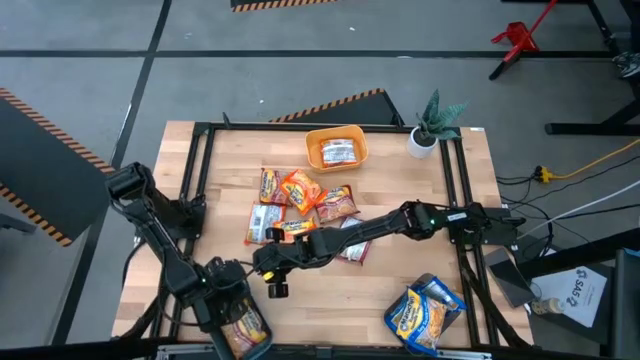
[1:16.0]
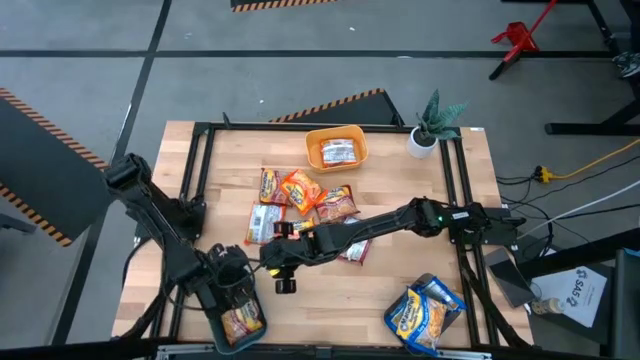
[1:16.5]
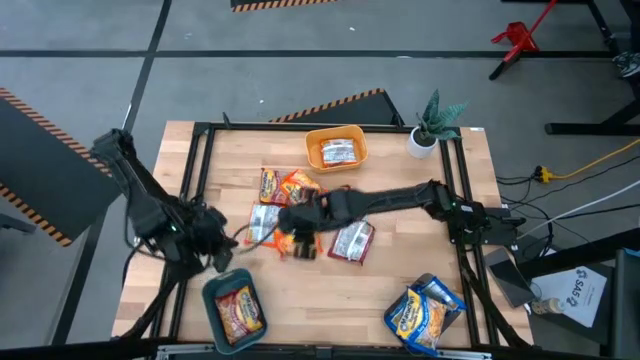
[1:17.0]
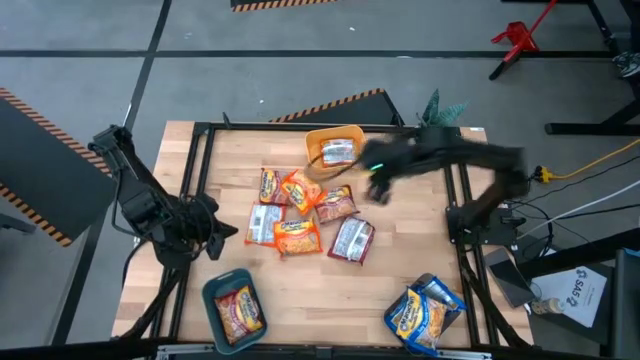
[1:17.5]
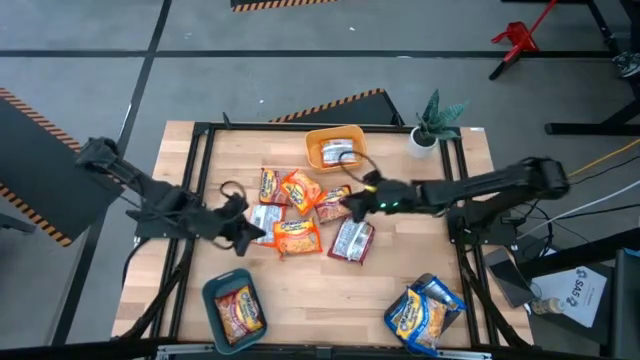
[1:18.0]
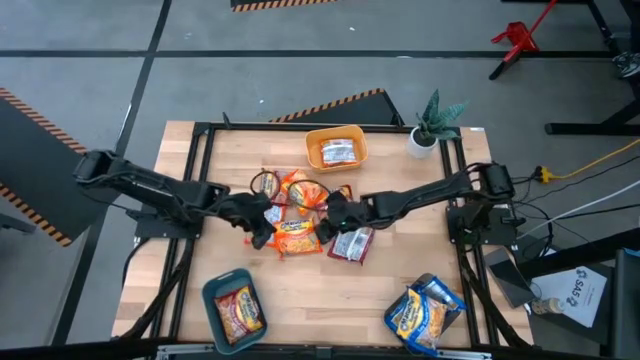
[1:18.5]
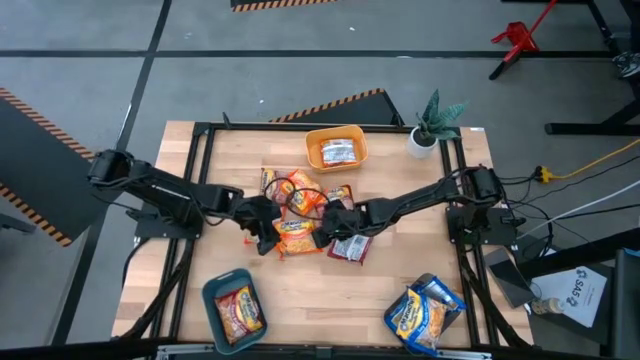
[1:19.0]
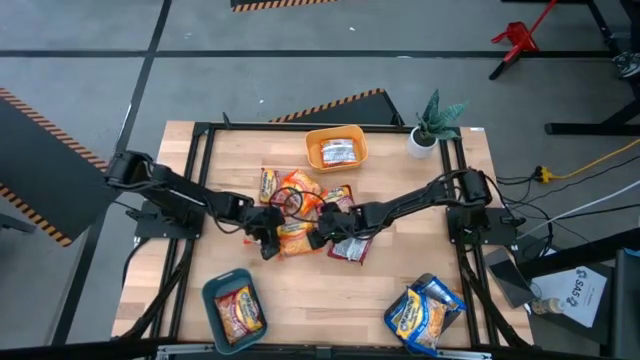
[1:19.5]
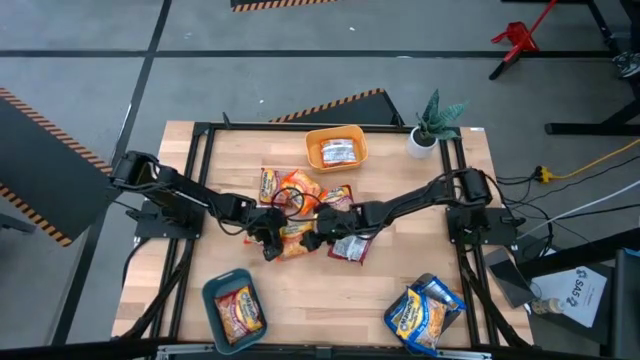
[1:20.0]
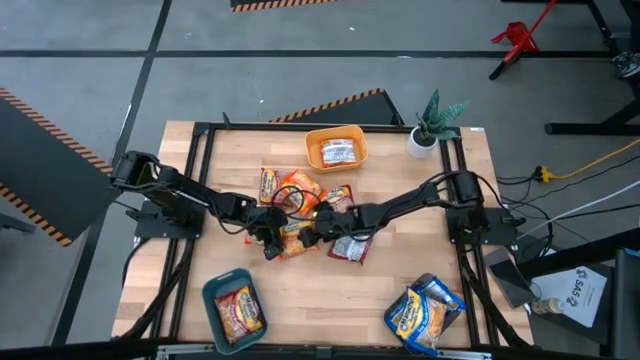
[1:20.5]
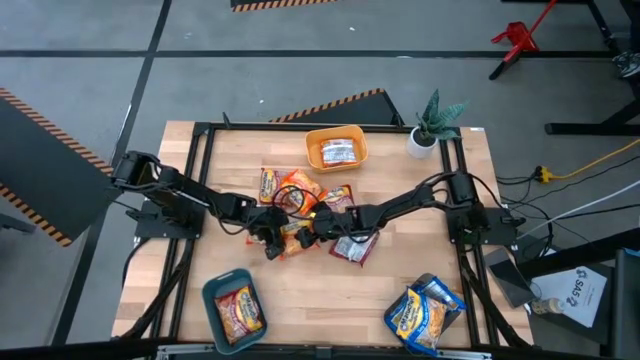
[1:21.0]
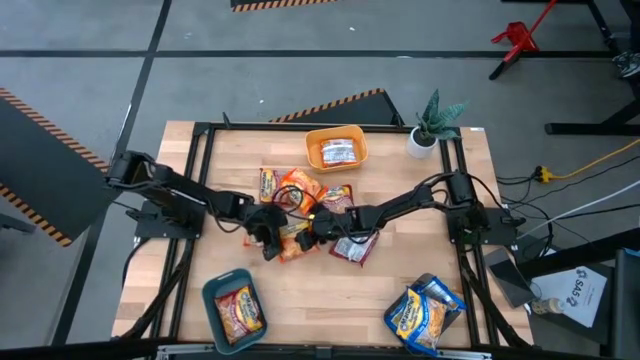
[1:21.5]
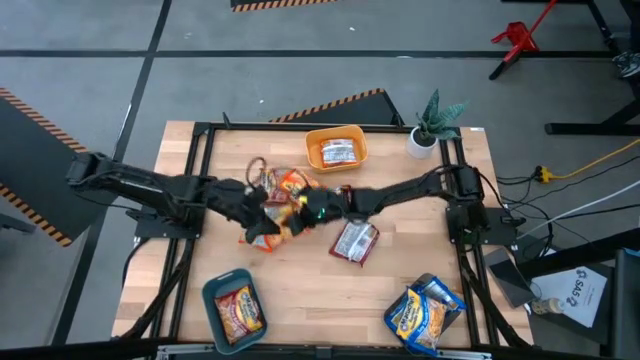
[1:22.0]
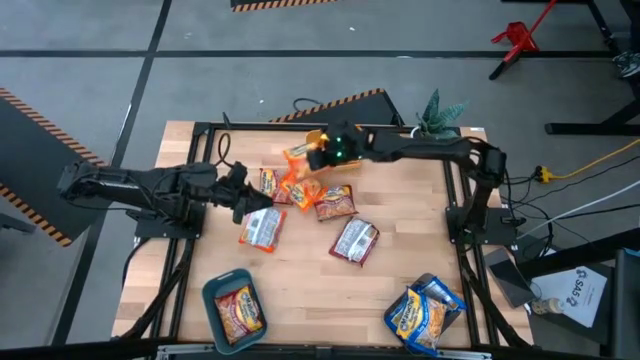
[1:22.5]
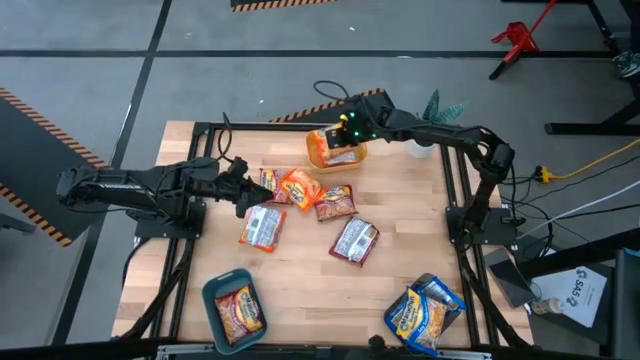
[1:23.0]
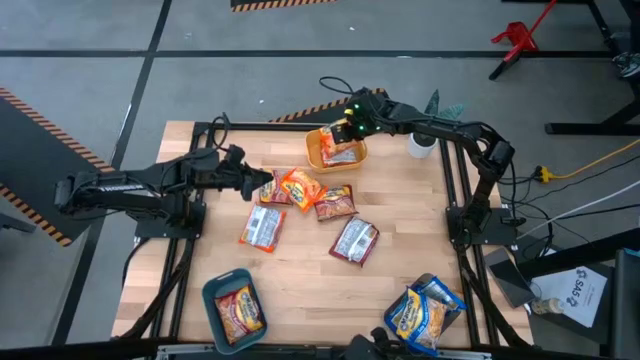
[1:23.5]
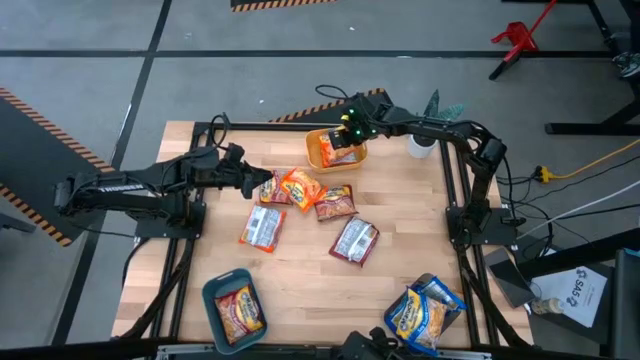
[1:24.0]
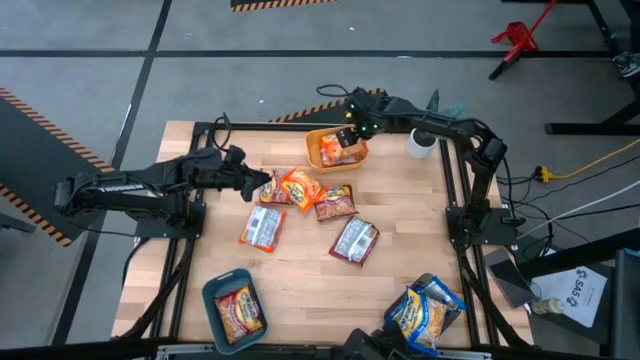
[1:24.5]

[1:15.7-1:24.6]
Task: Sort Maruchan noodles
Put the orange noodle pack into the yellow bin

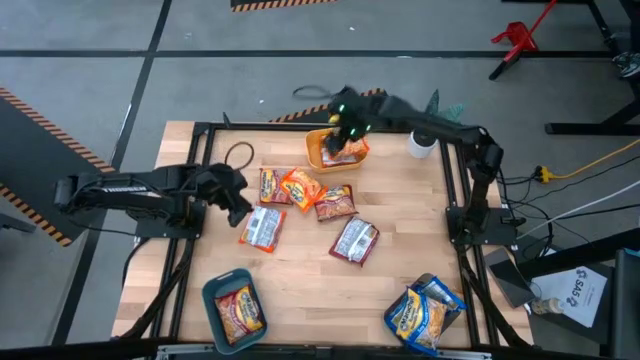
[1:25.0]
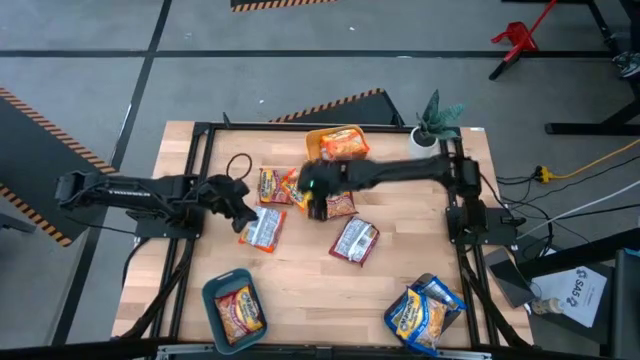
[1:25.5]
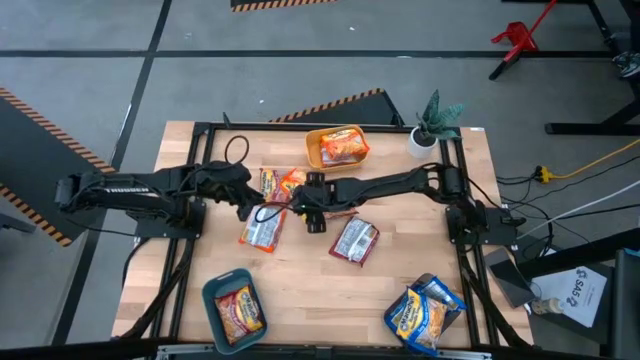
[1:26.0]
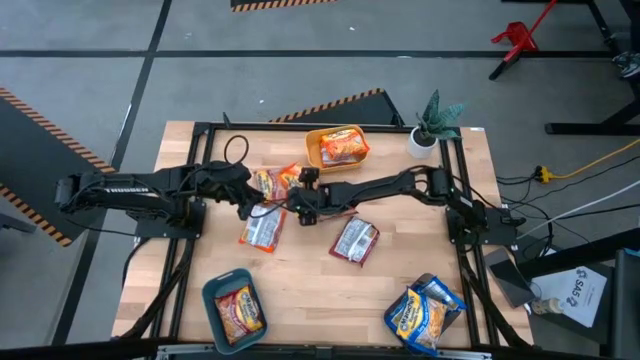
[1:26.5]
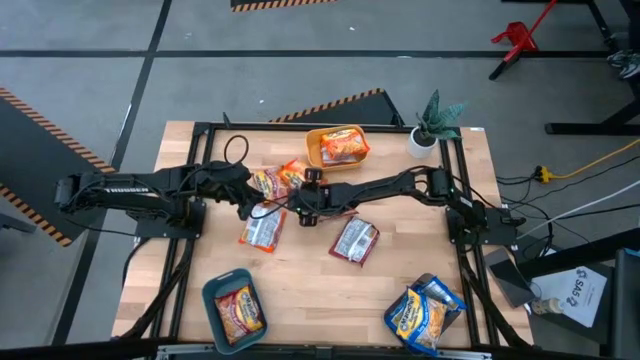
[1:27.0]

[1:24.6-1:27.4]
Put the orange noodle pack into the yellow bin

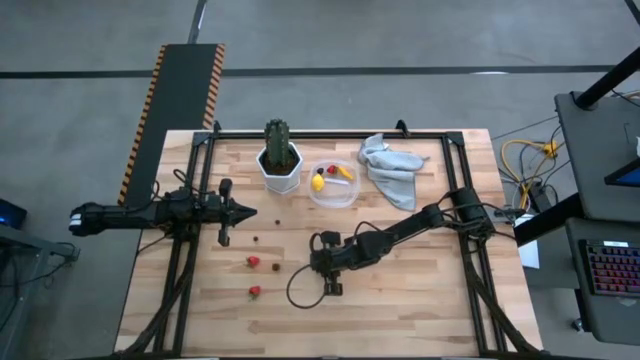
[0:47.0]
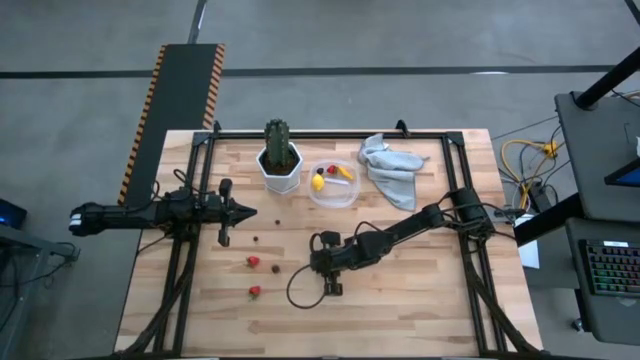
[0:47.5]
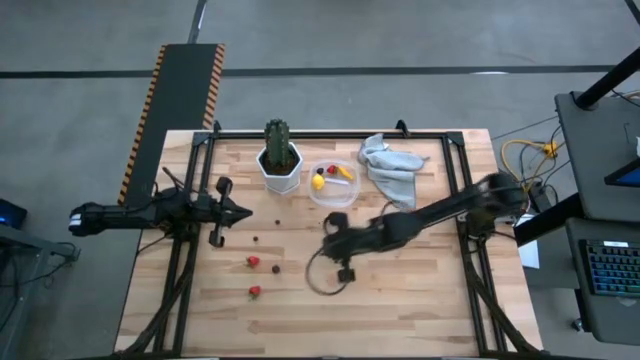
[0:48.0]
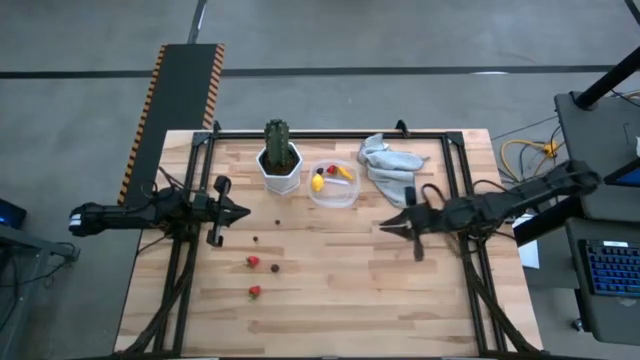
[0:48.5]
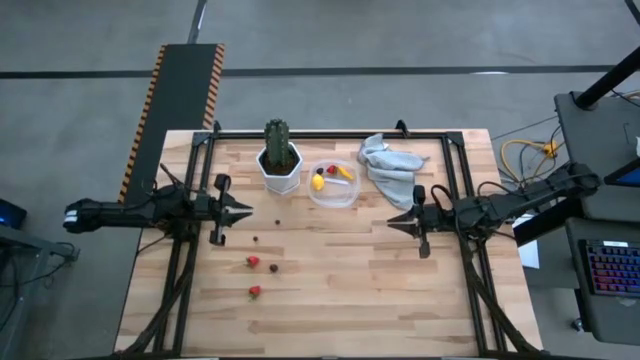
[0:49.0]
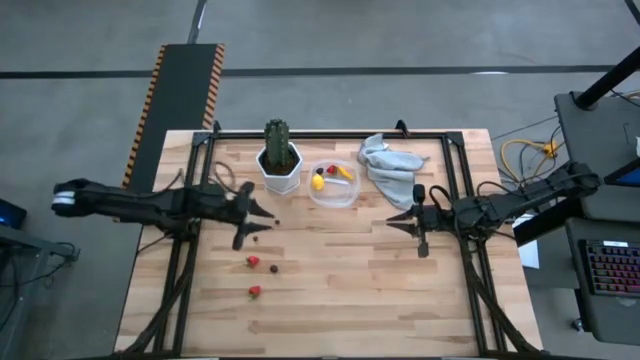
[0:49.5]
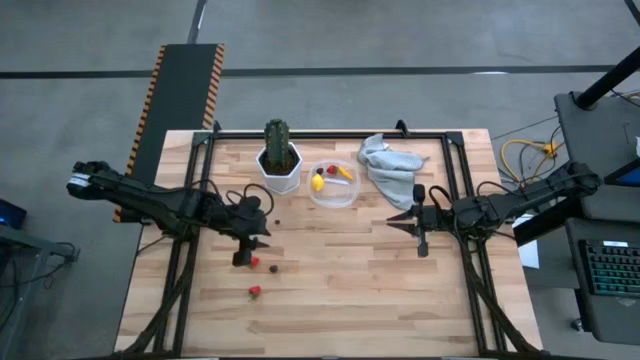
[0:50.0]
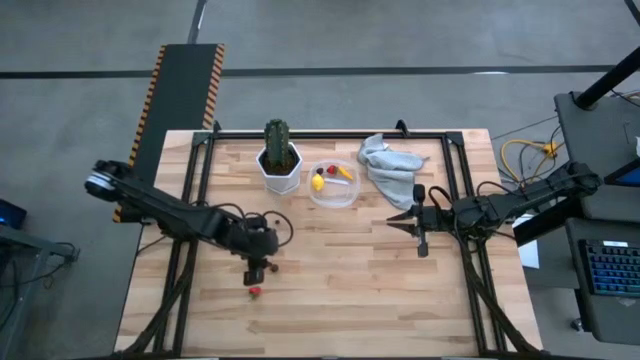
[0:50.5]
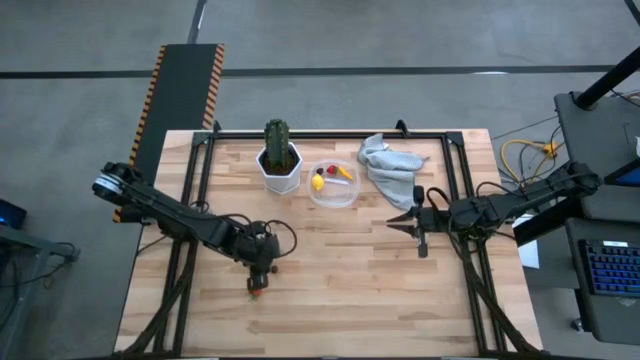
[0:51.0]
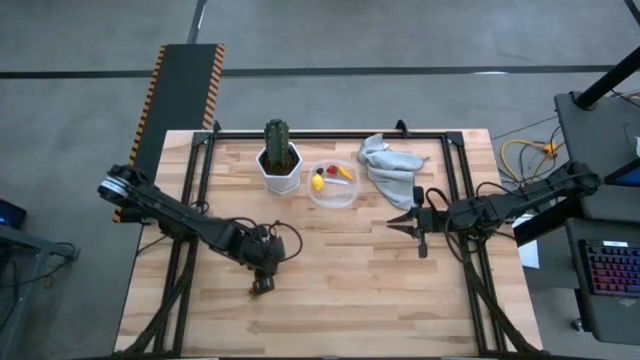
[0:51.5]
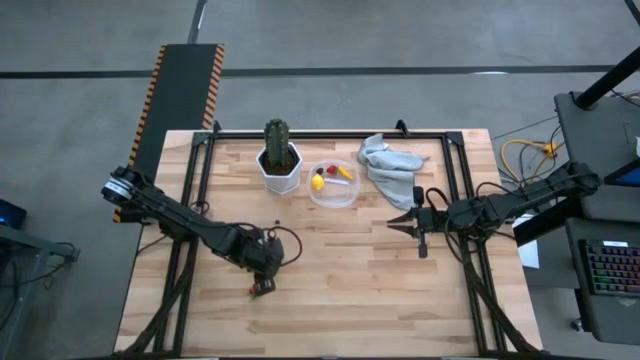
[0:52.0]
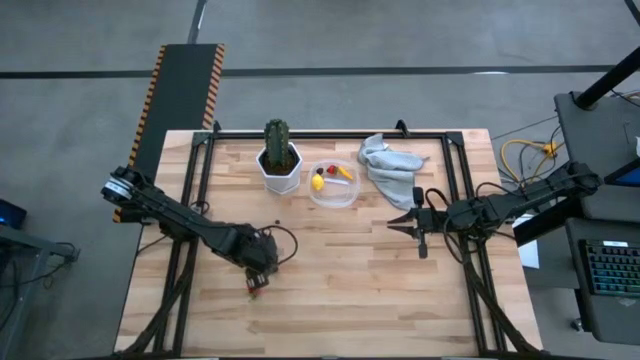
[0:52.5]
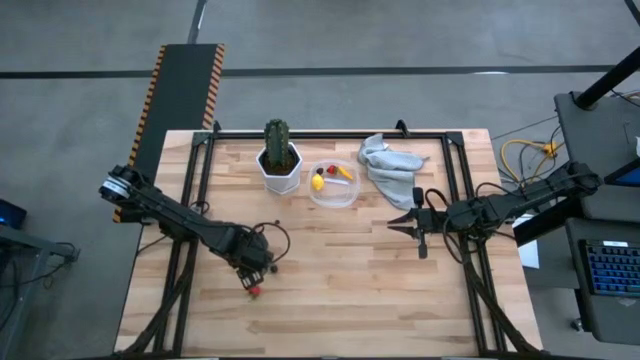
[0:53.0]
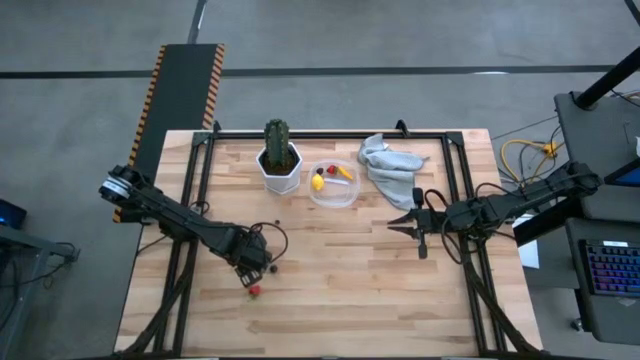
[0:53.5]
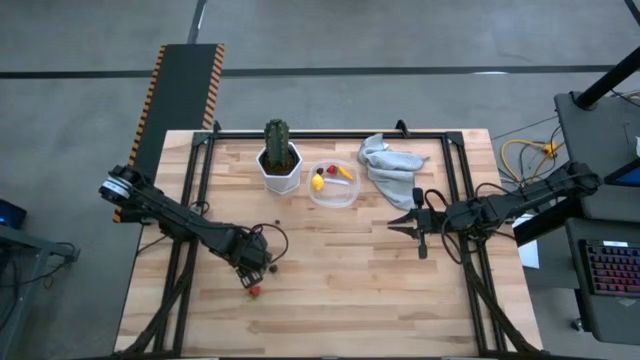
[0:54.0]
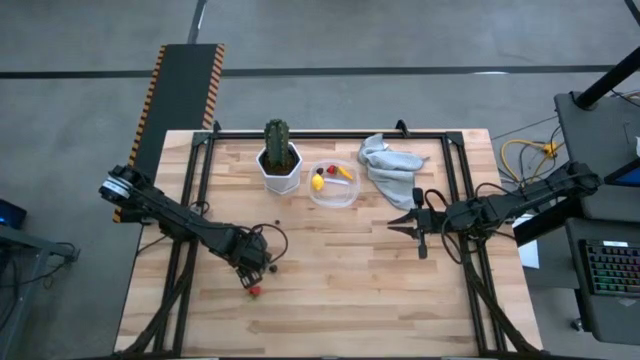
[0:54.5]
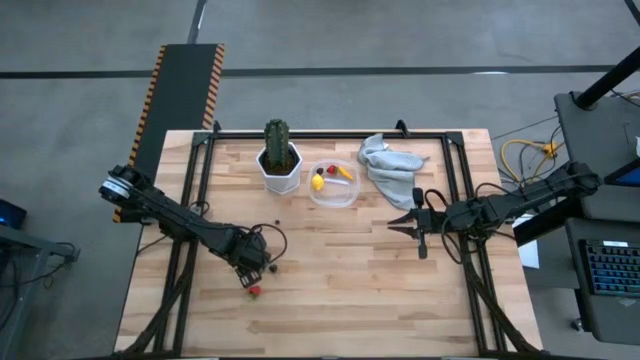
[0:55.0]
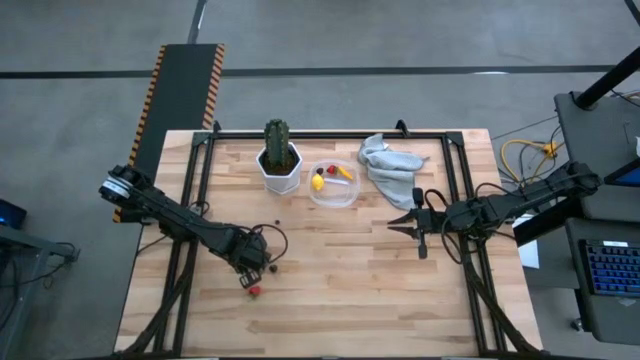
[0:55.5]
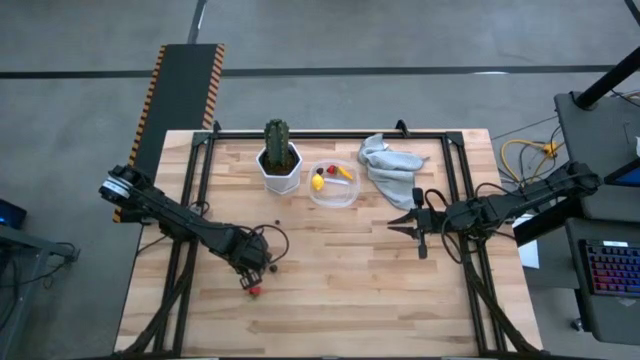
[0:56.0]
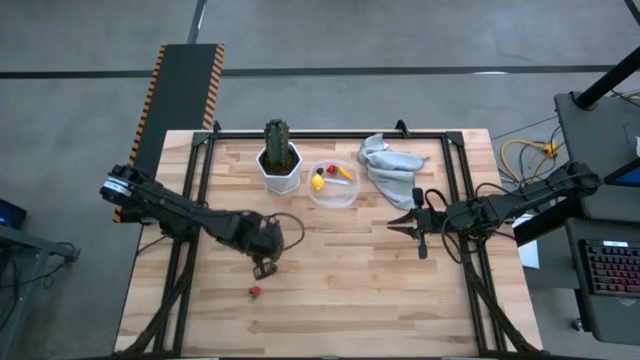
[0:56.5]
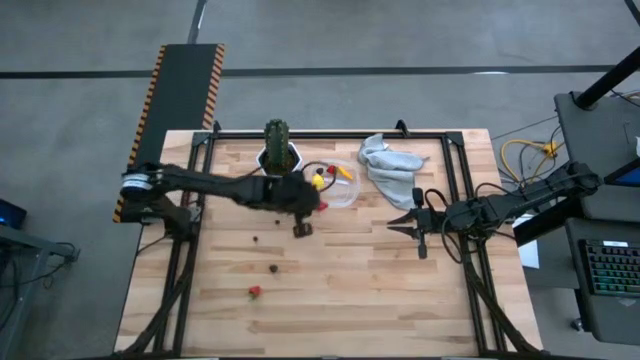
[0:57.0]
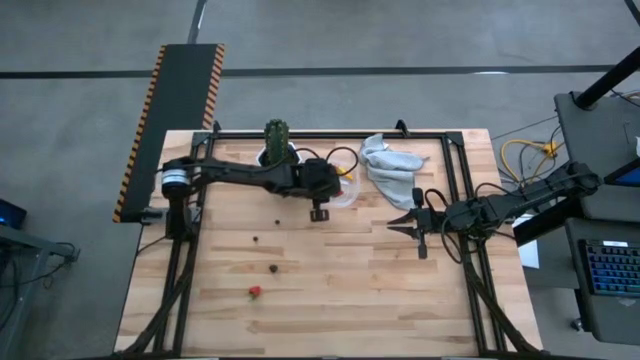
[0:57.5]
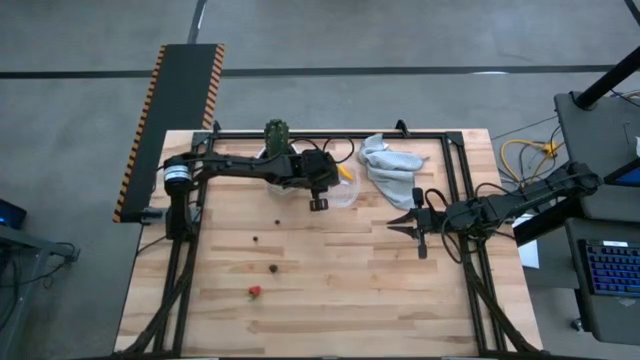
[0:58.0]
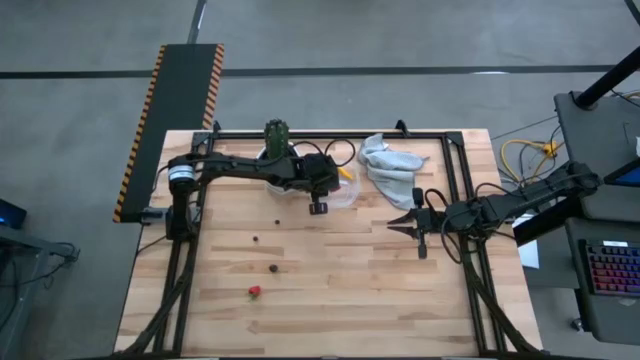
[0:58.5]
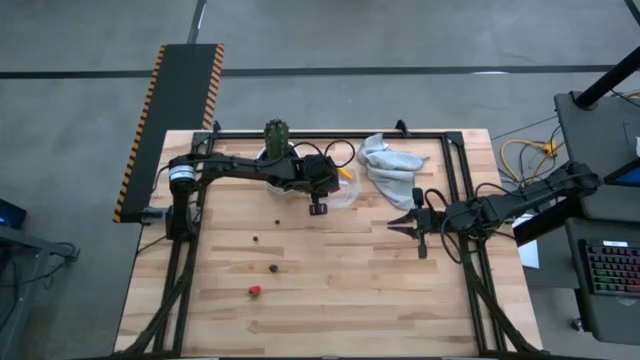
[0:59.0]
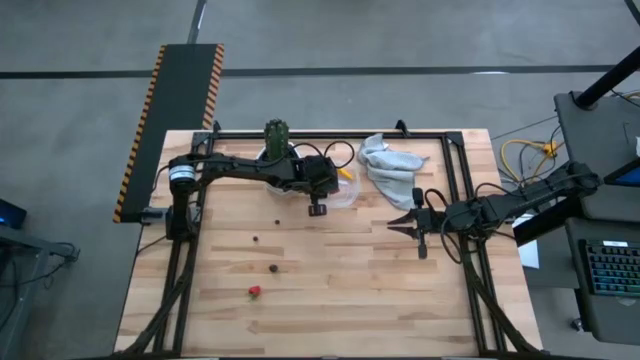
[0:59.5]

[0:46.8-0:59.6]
Task: Pick and placing Produce into tupperware
Put the top red strawberry into the transparent bin
